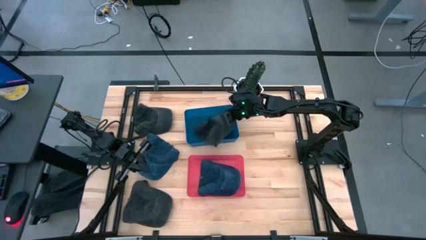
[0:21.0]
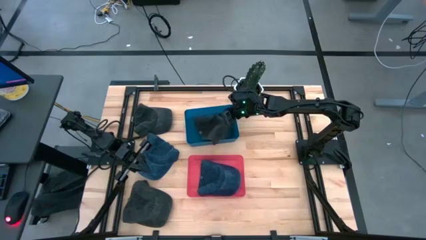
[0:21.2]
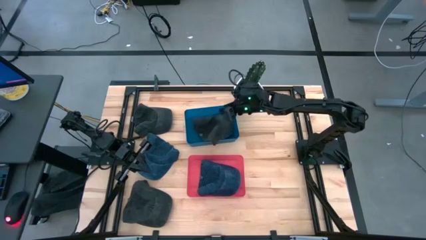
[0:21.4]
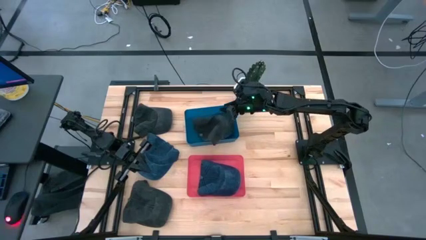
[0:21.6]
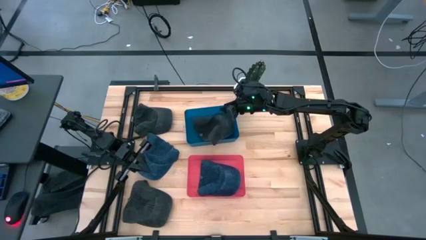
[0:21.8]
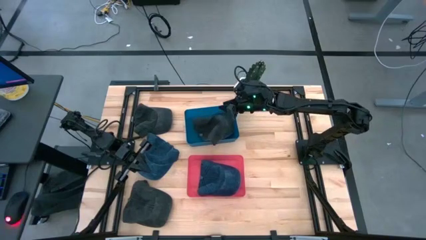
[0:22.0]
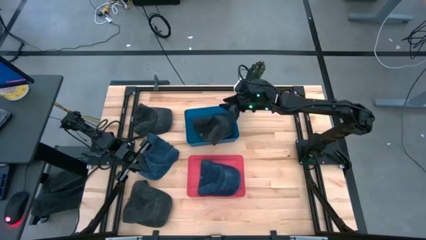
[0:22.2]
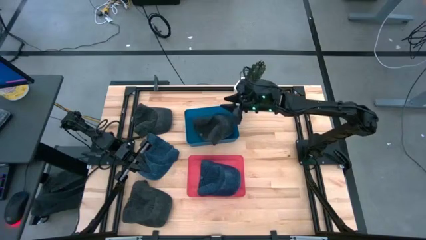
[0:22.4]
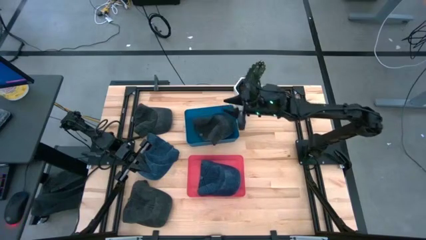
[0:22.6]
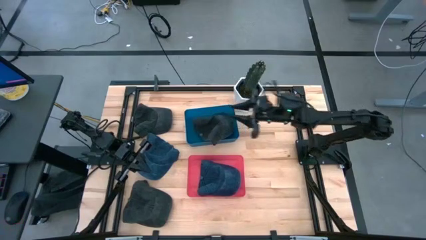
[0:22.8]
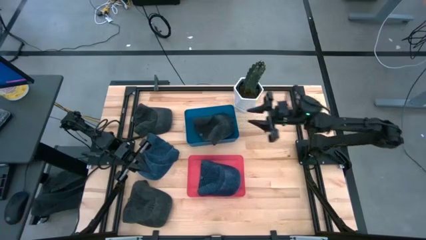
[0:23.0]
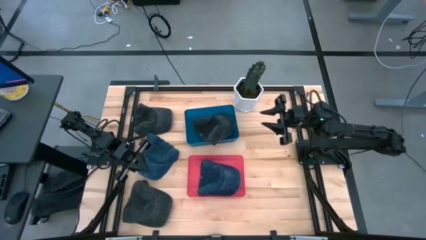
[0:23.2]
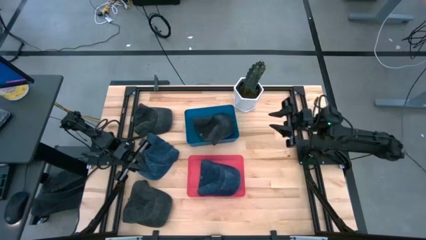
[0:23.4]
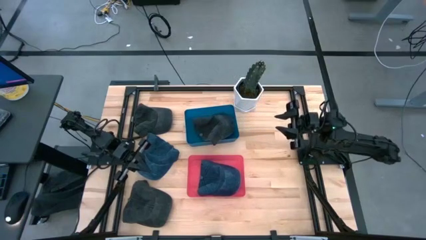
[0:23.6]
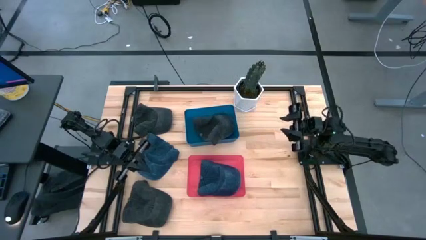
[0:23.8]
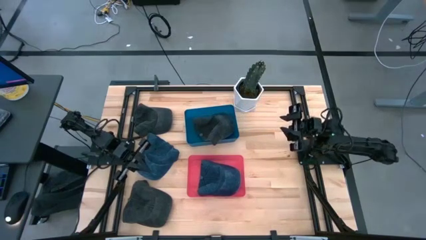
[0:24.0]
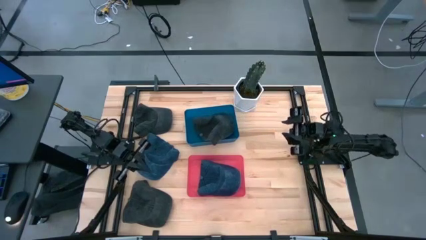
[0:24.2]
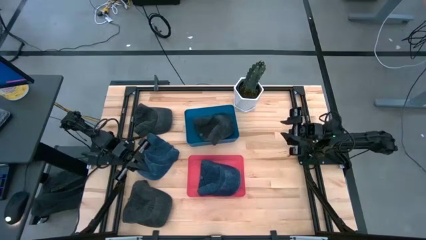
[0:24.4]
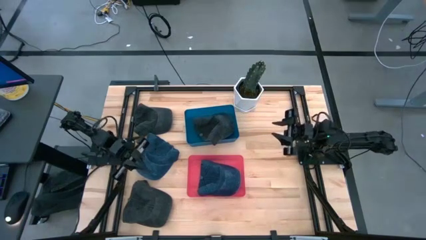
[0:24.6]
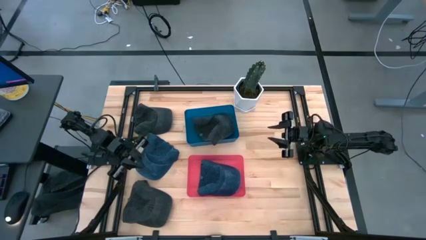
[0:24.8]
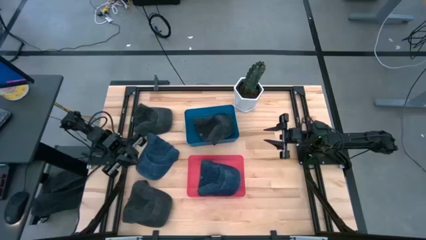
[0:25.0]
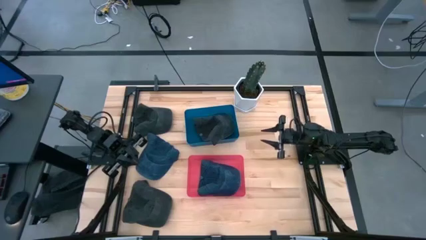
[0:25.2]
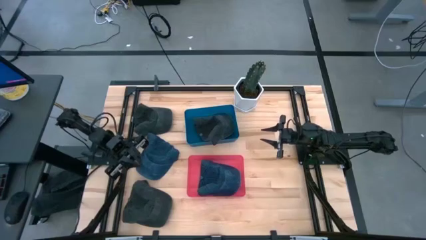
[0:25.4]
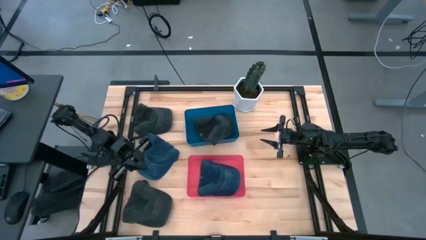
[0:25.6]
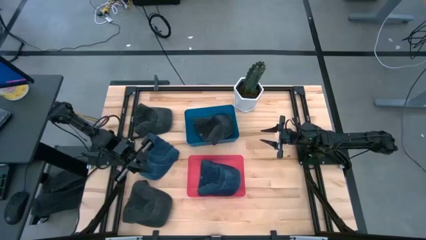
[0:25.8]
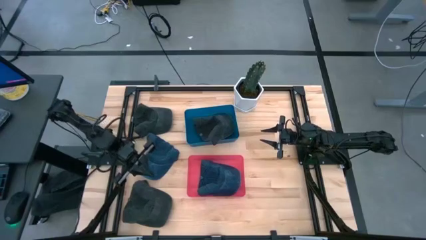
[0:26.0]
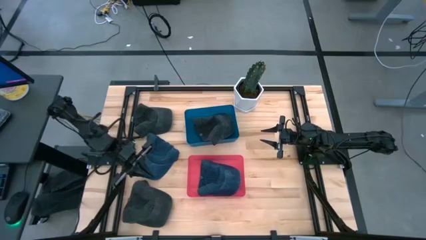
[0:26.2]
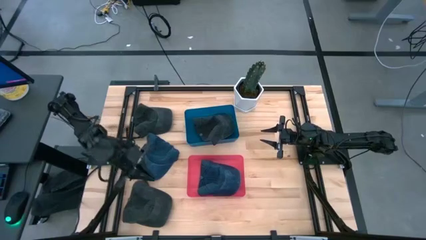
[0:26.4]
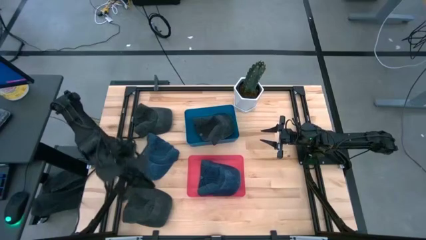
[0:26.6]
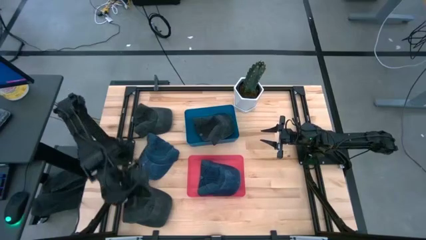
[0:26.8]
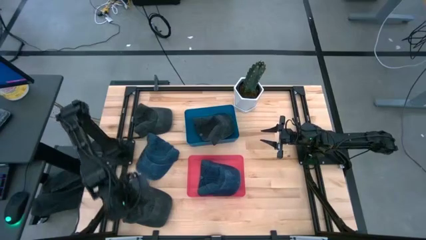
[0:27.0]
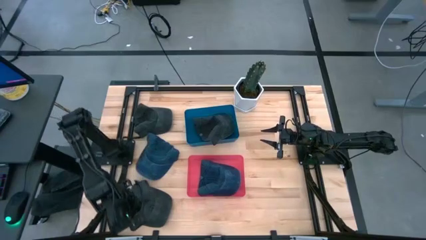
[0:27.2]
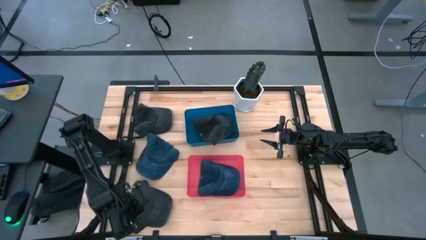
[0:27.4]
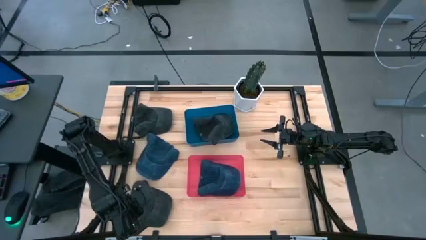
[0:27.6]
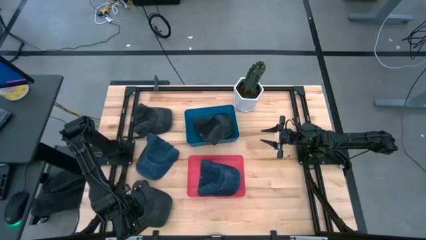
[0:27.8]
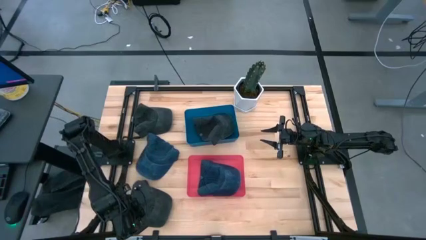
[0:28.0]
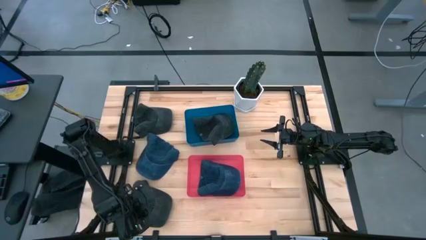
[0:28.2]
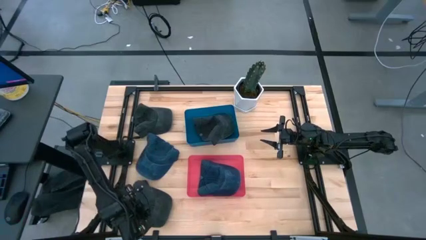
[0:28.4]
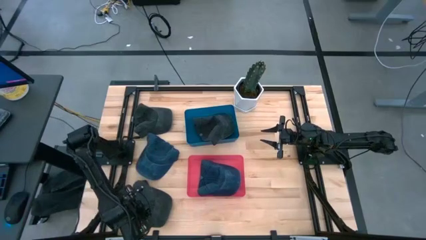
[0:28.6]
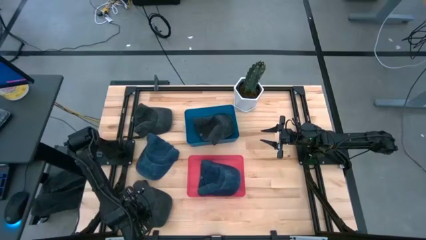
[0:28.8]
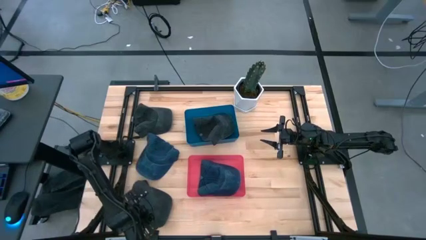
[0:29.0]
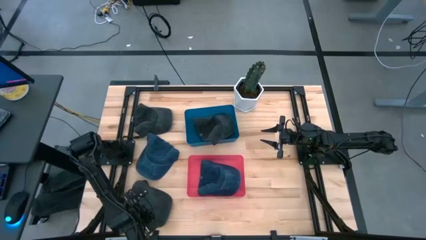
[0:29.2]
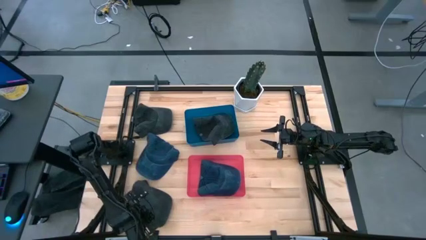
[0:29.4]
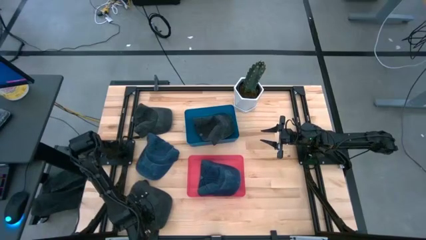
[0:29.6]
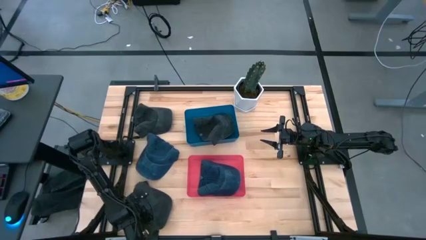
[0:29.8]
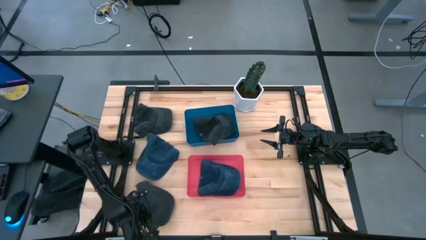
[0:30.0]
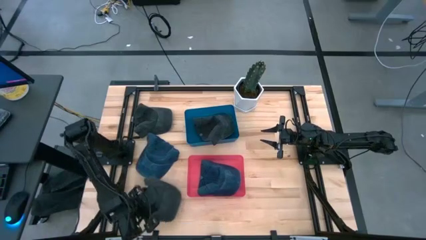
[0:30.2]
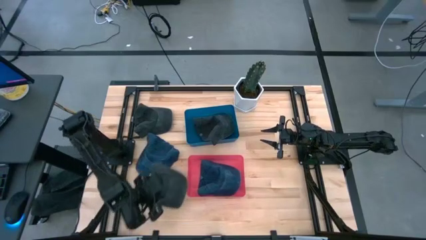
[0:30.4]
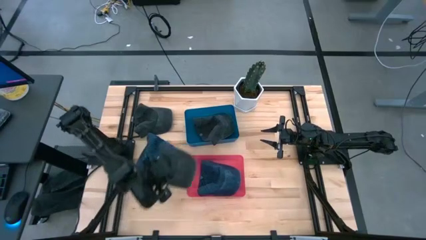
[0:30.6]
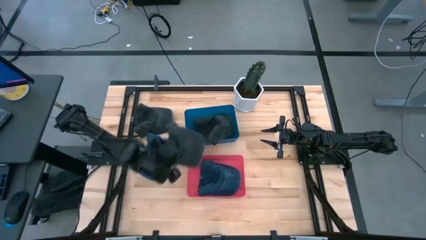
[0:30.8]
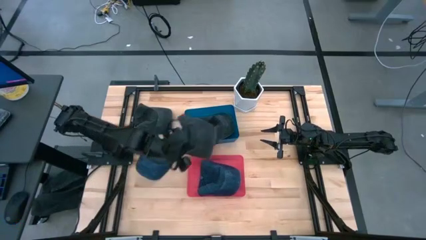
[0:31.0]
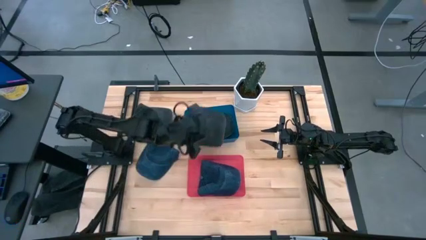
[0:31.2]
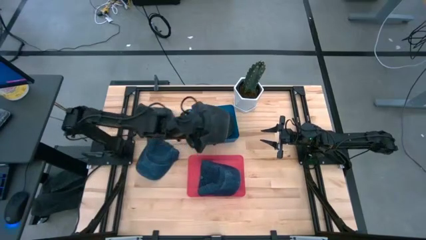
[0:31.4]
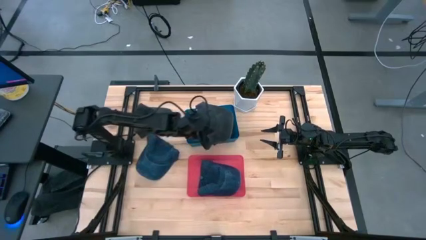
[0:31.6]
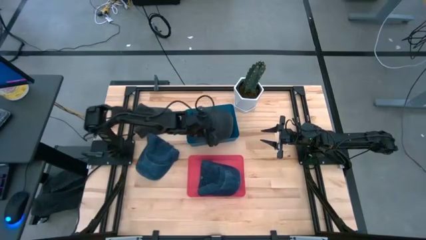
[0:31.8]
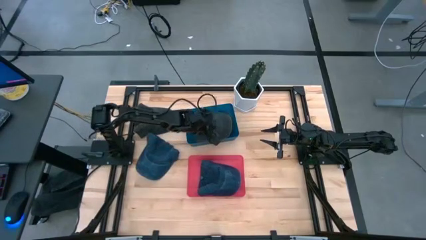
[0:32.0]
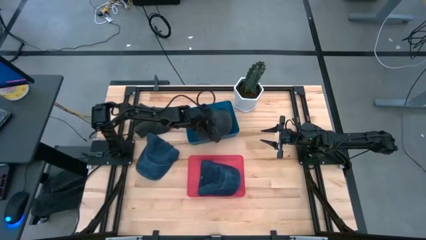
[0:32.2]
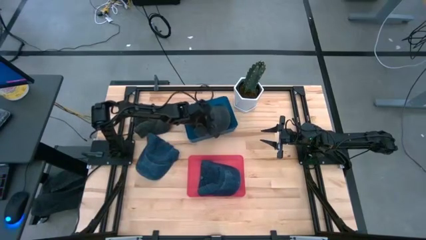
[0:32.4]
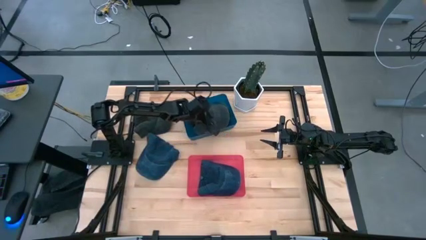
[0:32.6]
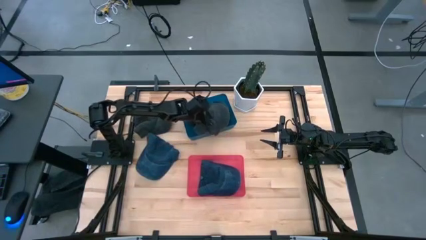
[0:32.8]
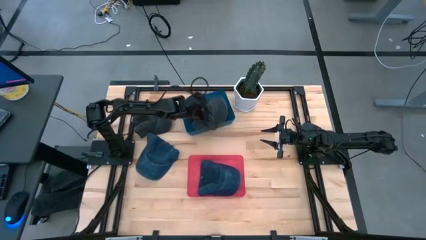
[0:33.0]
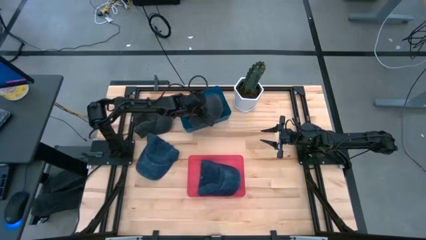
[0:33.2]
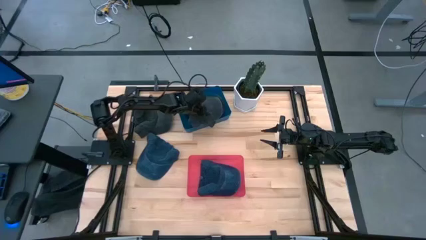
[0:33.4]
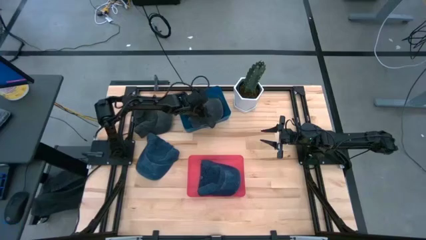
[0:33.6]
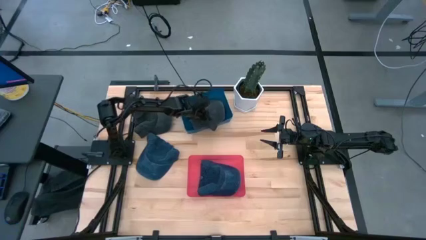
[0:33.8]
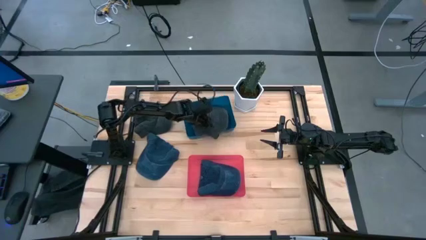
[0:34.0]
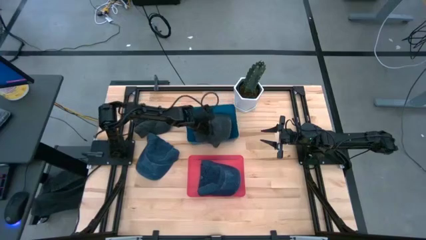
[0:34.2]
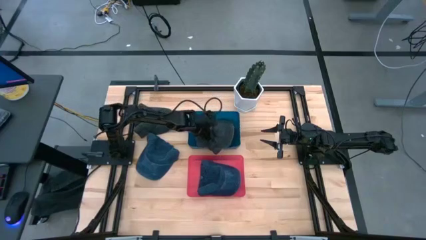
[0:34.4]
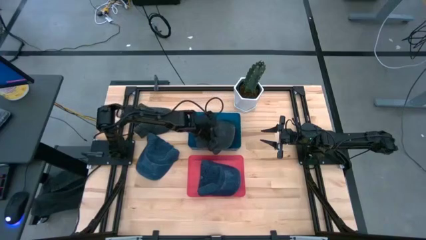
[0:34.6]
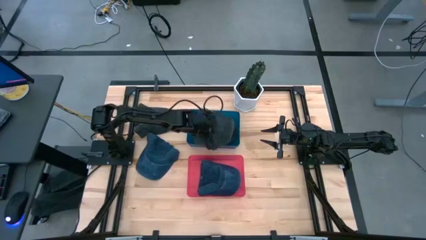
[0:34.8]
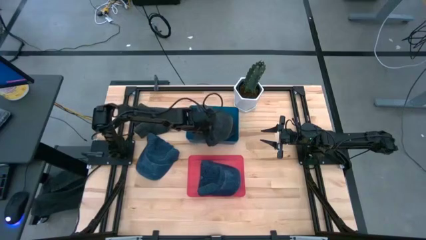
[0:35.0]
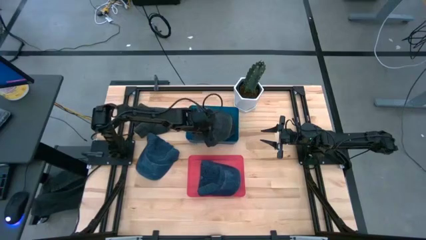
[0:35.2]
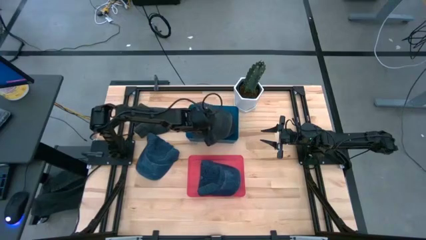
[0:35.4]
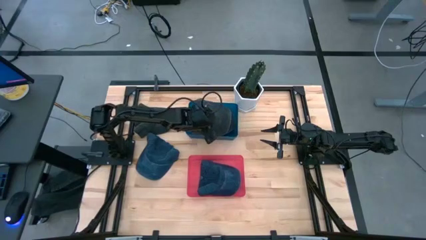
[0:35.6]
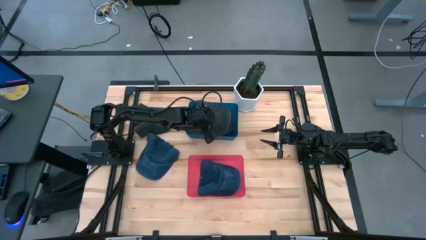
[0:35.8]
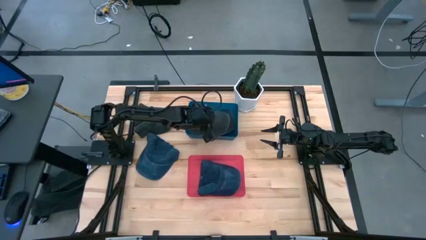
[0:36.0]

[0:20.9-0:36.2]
Task: Pick & Place hat
Put the bottom black cap into the blue bin
